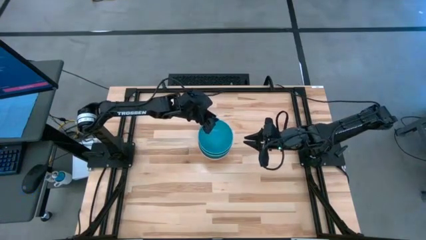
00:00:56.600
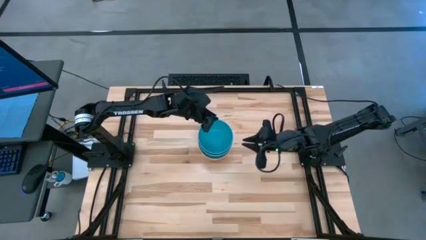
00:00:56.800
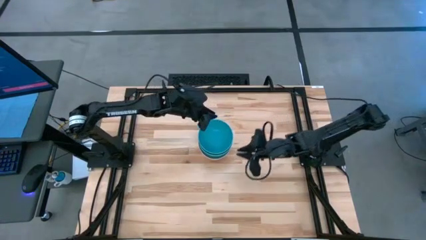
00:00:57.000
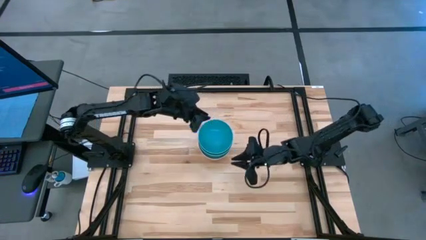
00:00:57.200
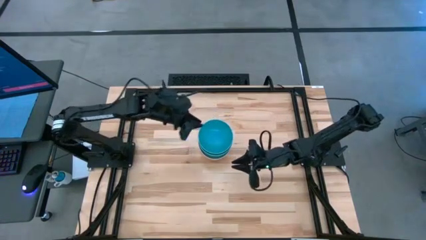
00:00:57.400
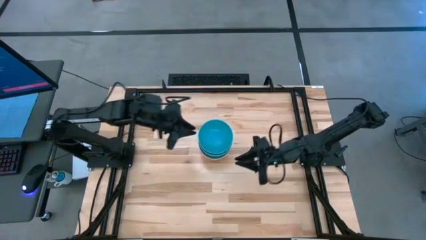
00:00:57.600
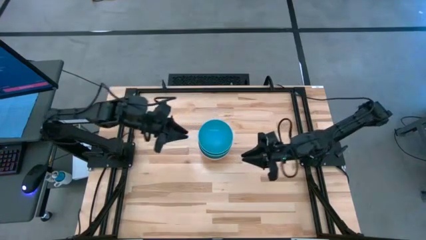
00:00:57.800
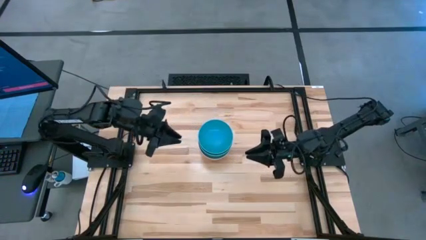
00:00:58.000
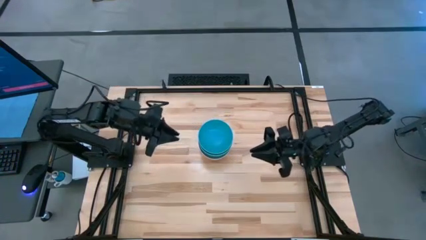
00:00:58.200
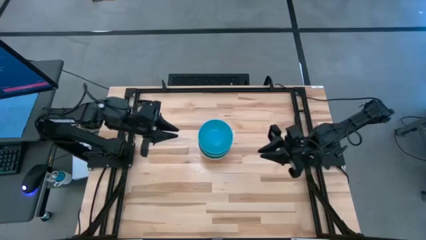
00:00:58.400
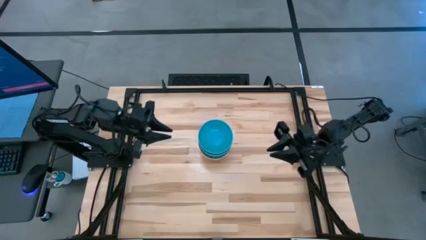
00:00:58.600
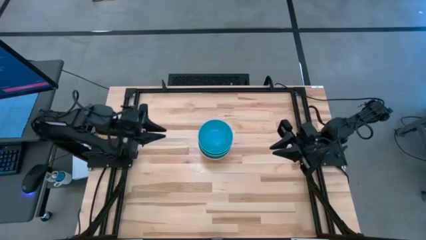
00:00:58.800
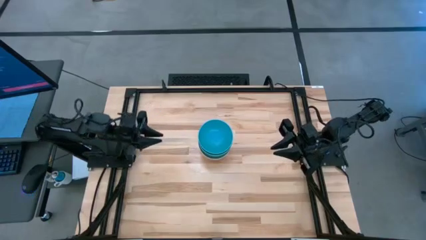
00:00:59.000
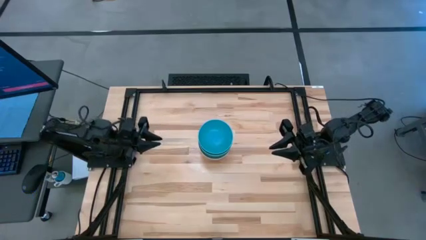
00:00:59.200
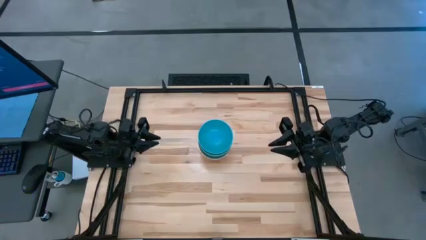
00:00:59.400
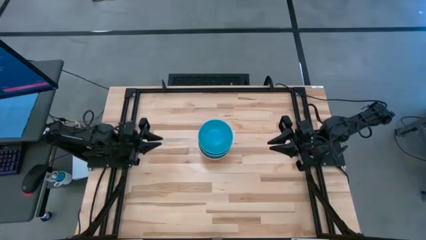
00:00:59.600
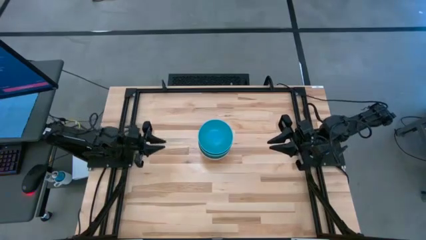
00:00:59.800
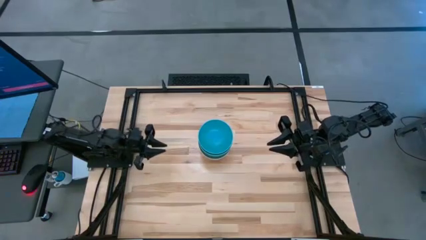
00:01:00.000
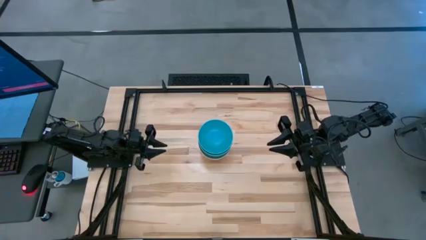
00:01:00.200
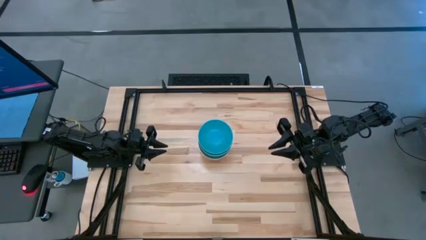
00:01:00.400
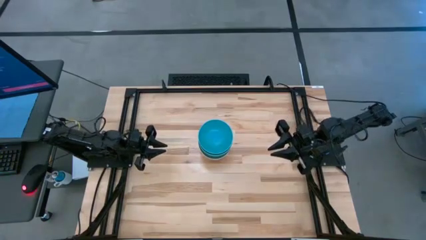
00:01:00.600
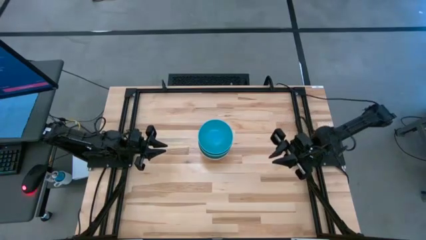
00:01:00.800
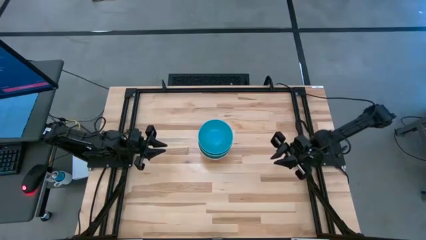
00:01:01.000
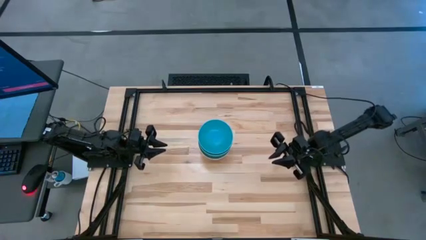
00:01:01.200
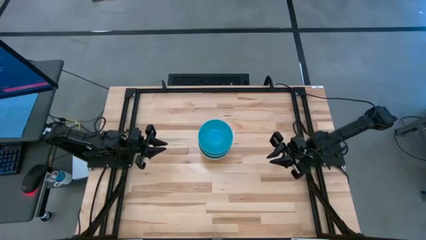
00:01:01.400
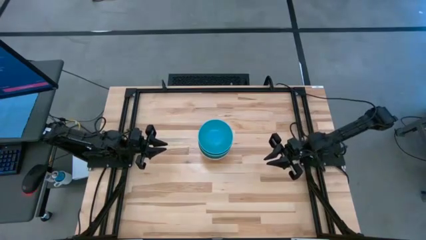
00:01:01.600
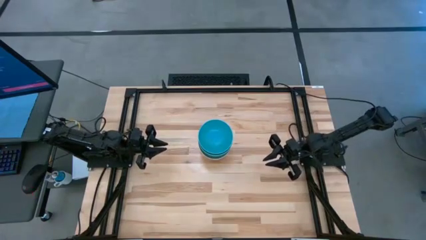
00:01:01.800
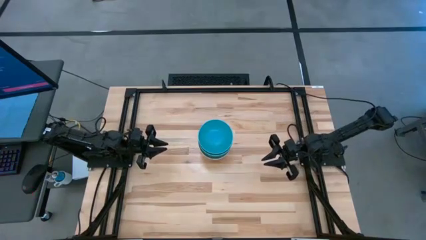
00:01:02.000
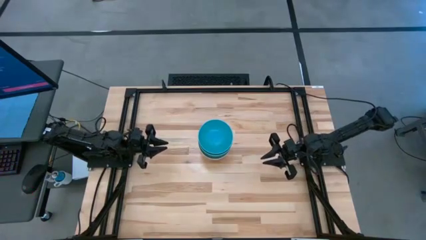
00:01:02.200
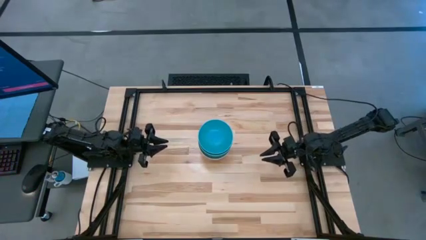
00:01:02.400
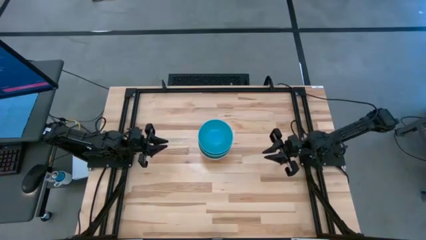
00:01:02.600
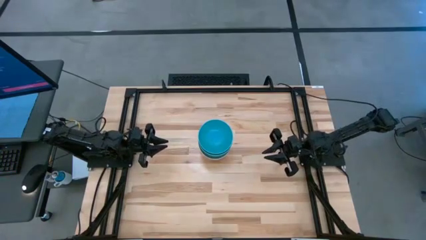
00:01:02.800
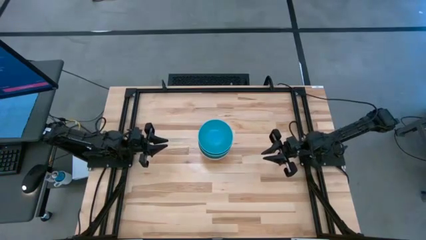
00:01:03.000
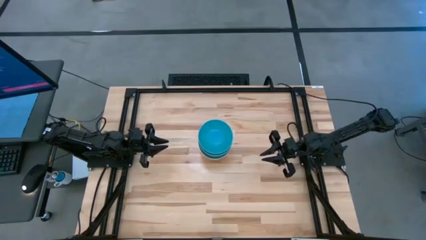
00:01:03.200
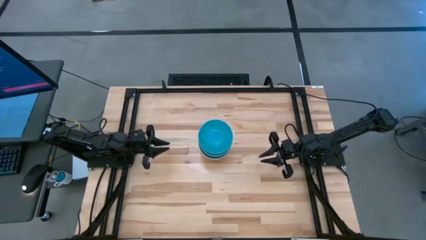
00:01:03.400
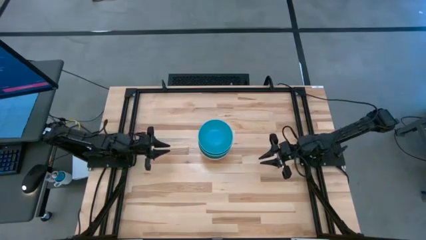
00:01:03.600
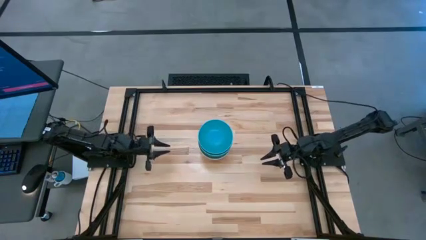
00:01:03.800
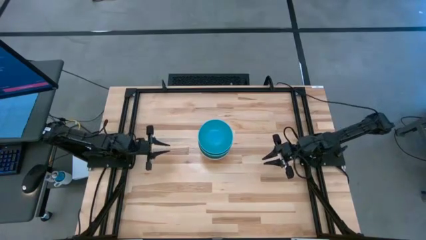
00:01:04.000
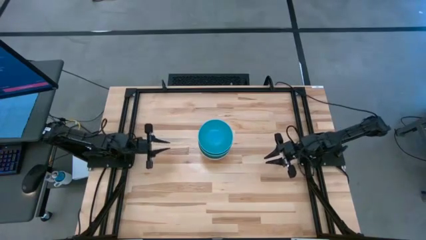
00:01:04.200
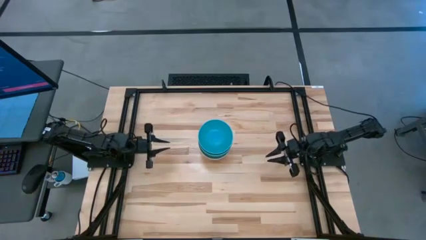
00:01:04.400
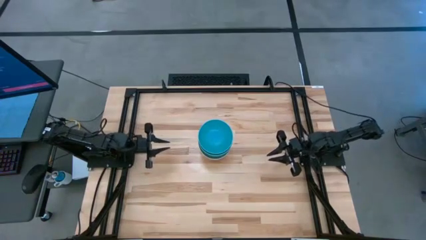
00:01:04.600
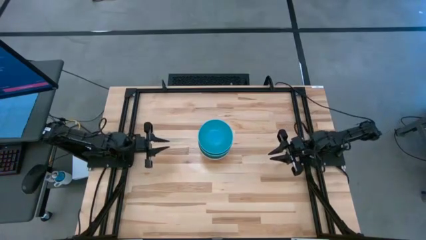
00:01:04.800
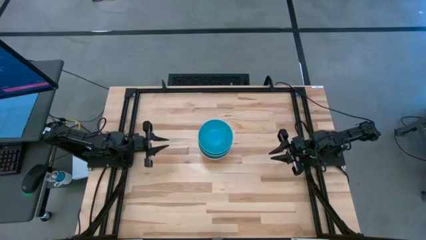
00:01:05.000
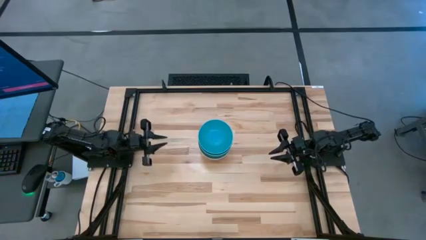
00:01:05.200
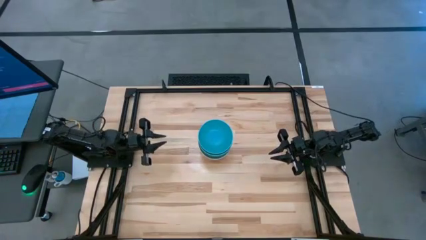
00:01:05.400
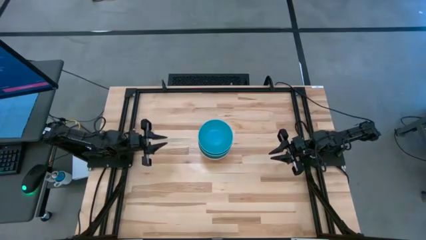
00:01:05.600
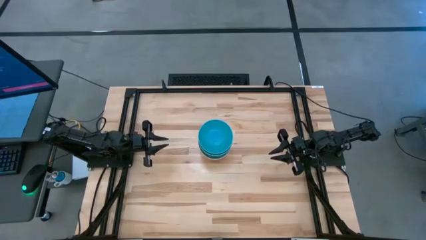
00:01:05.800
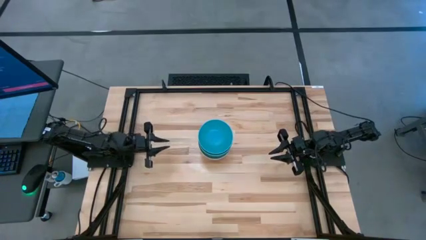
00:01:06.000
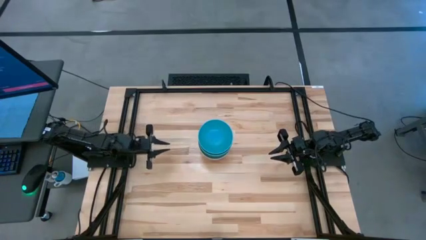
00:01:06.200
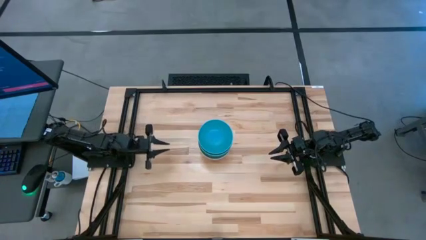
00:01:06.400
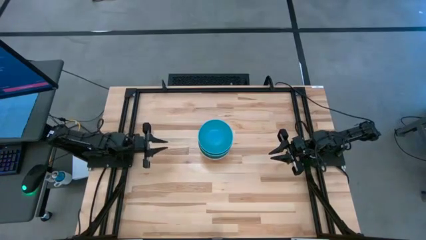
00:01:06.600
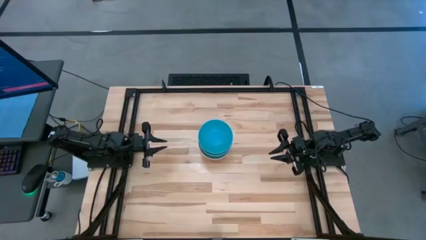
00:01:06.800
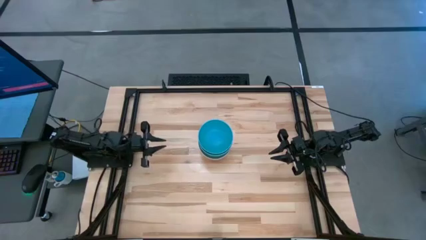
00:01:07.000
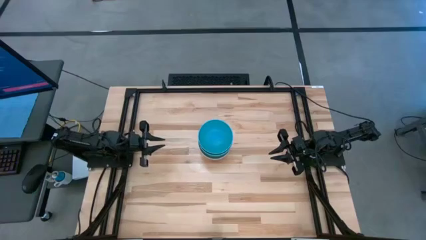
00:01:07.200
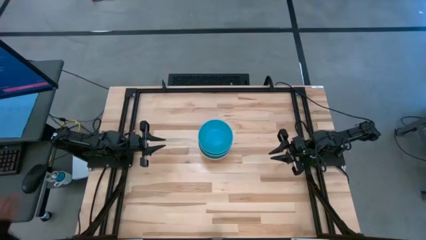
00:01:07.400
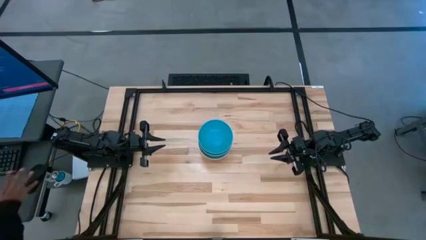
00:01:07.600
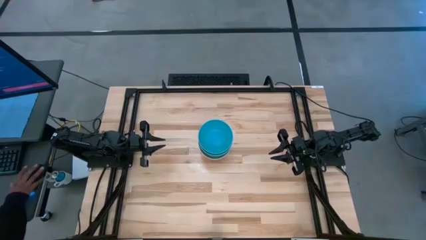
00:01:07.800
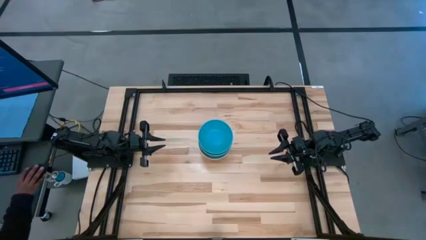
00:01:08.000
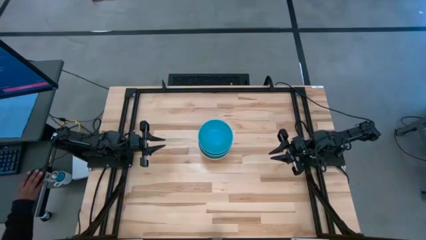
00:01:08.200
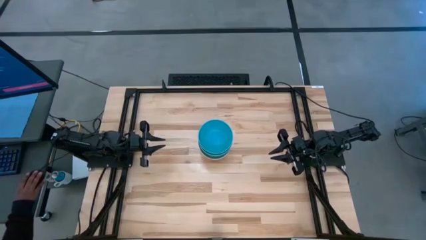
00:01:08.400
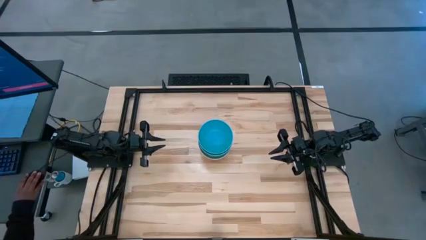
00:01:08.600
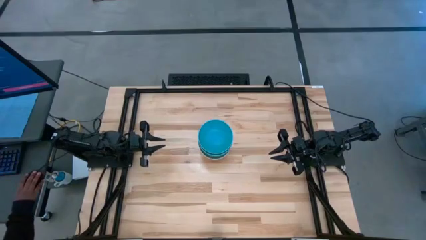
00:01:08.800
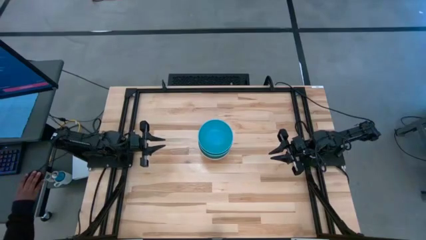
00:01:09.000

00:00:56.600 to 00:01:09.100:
Task: Nest bowls inside each other
Return to Home Position

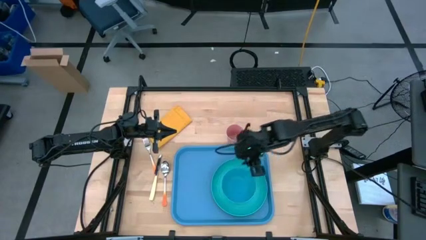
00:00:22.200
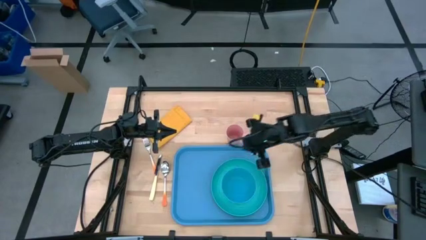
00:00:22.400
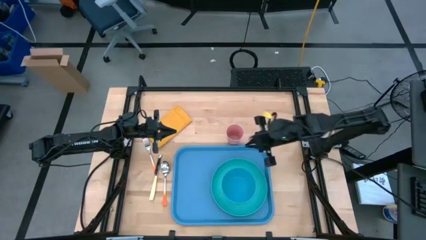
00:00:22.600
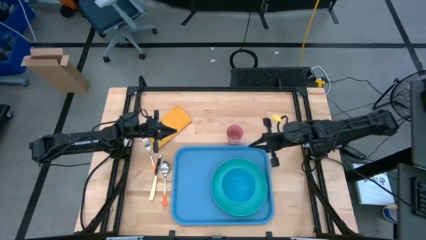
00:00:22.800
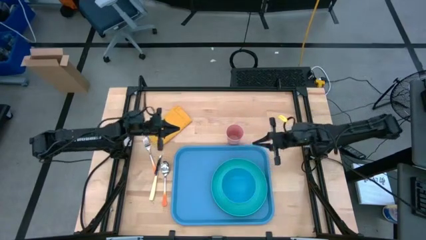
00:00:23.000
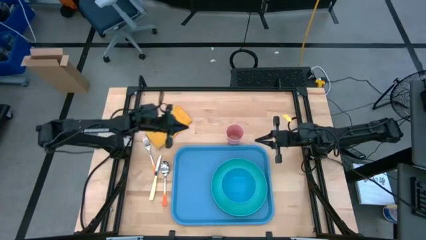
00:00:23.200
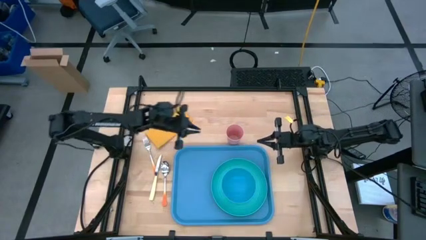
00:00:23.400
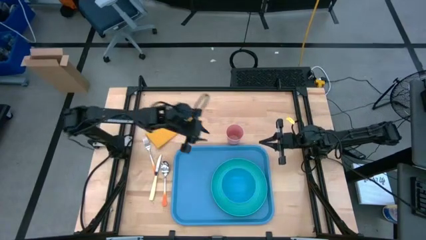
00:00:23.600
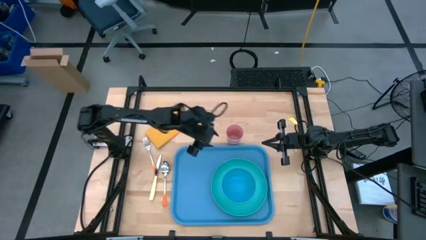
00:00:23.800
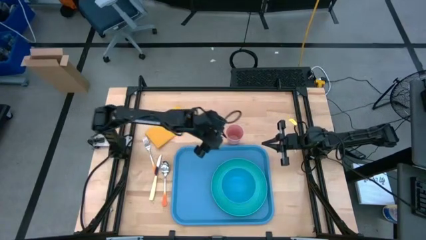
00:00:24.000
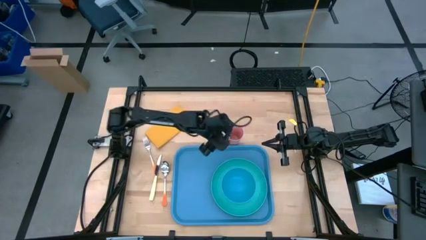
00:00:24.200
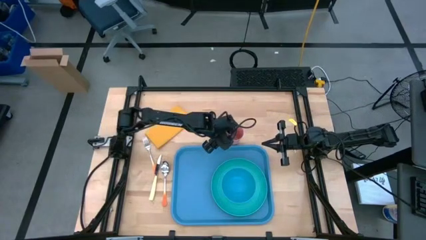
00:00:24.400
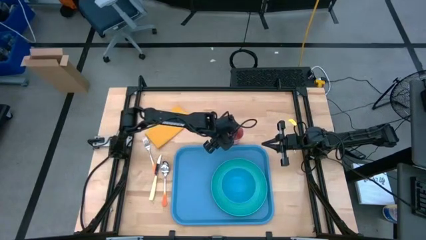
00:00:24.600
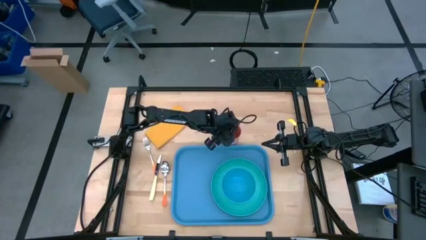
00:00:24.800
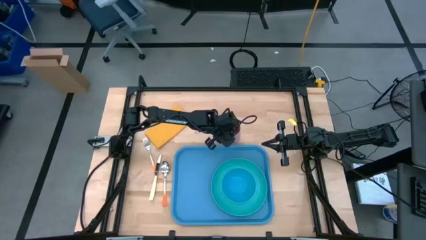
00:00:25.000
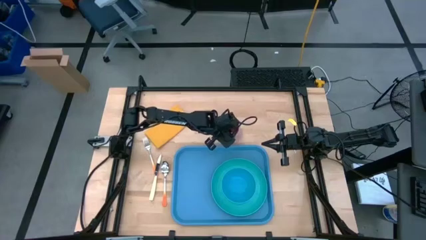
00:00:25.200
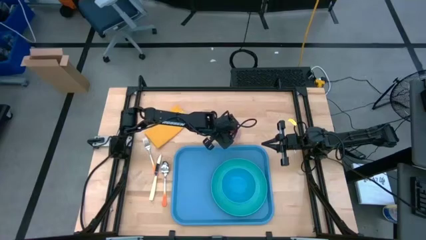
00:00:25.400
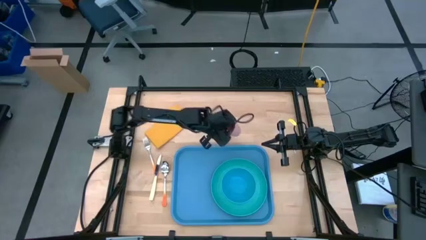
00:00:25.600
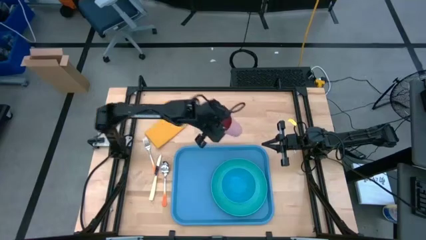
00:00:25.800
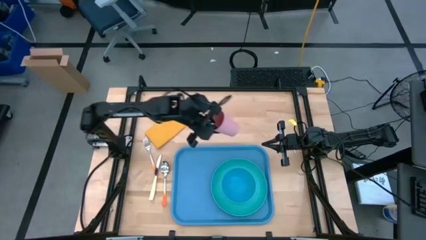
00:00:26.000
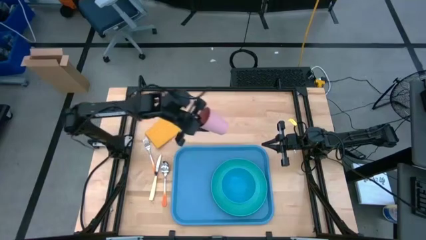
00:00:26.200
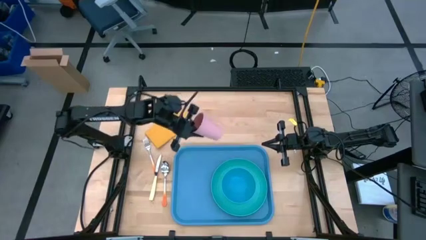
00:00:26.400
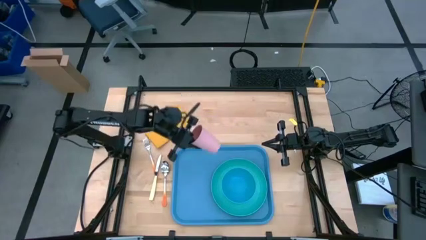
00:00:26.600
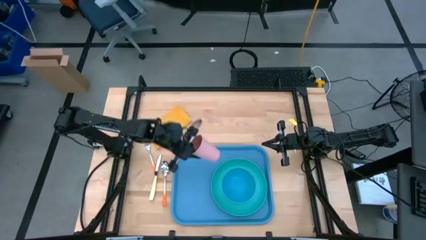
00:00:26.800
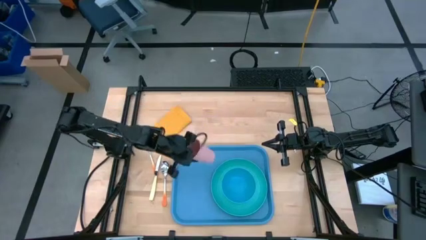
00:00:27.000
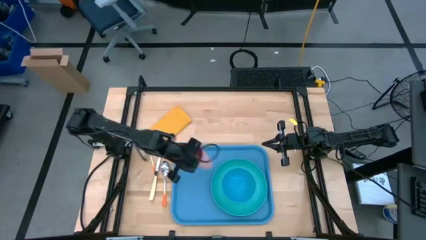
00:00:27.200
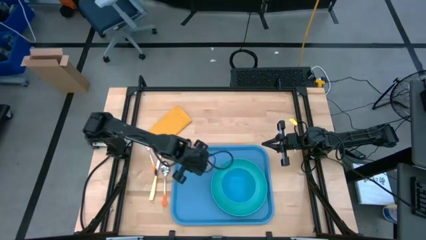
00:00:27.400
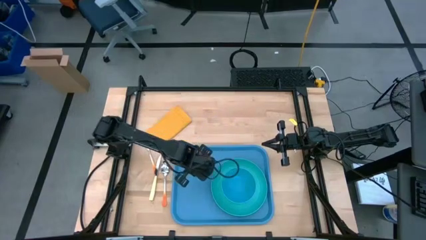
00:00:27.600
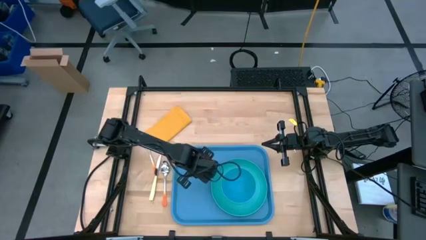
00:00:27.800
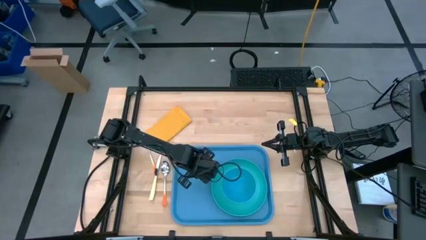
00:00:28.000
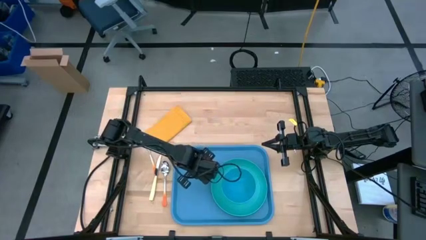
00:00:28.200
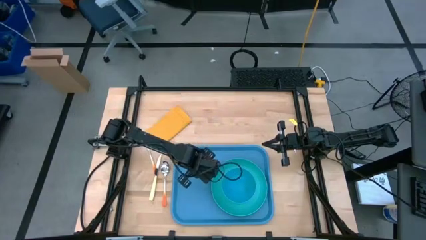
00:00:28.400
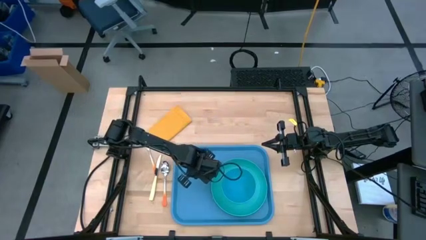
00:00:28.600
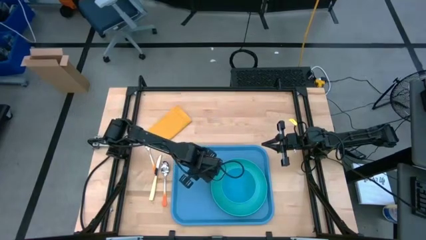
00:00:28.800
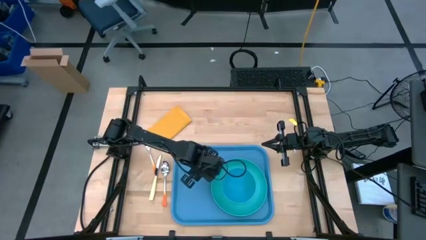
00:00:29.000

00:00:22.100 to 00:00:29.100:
Task: Set up tray
Put the pink cup to the top left of the blue plate on the blue tray
